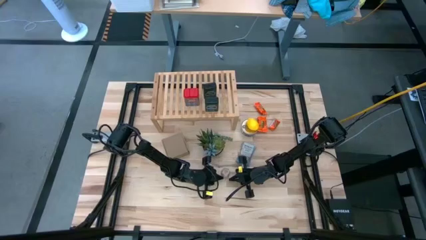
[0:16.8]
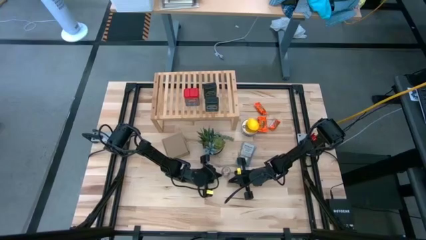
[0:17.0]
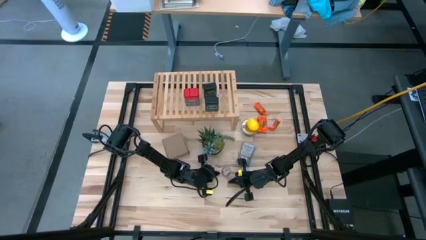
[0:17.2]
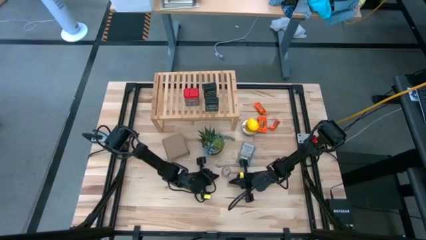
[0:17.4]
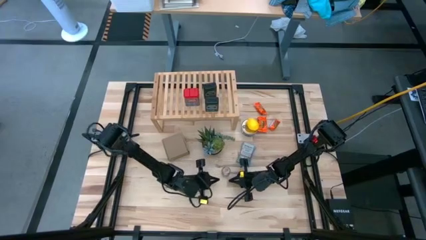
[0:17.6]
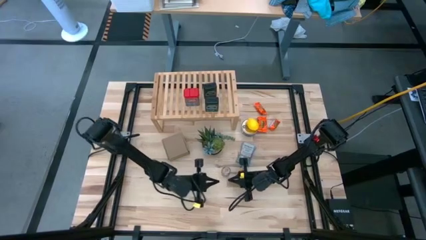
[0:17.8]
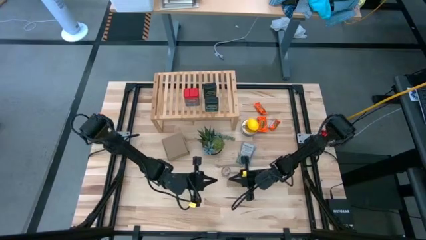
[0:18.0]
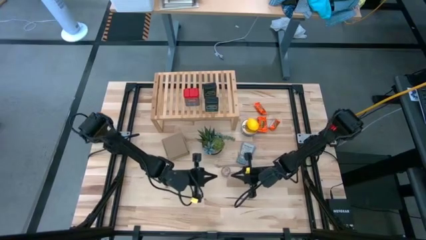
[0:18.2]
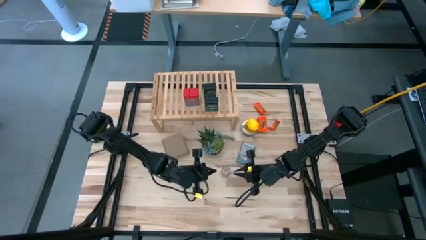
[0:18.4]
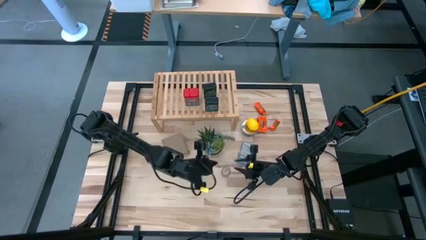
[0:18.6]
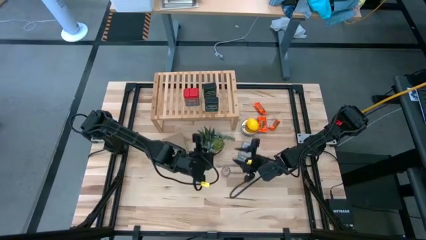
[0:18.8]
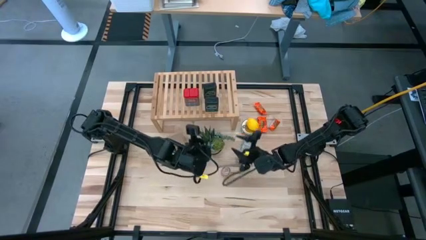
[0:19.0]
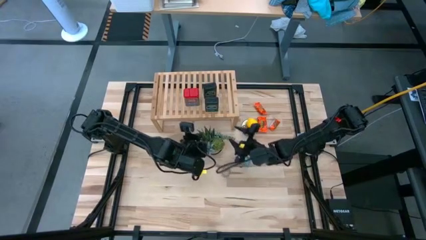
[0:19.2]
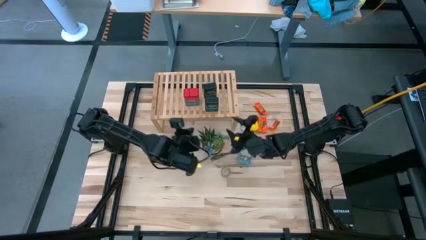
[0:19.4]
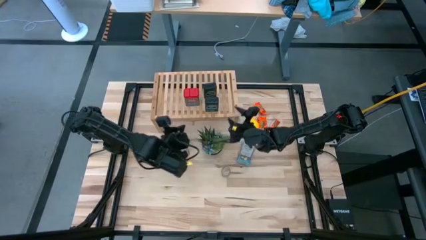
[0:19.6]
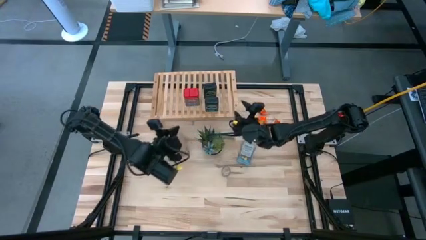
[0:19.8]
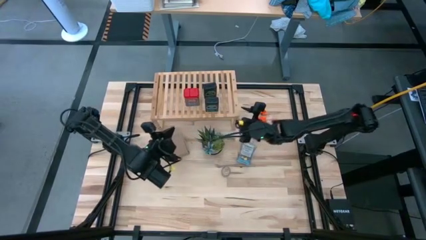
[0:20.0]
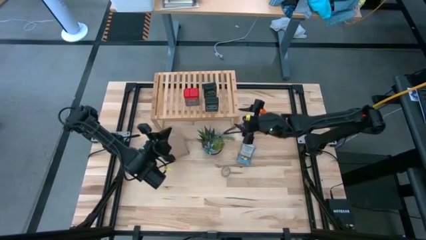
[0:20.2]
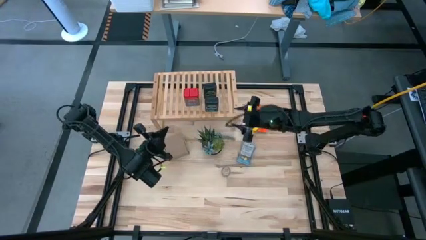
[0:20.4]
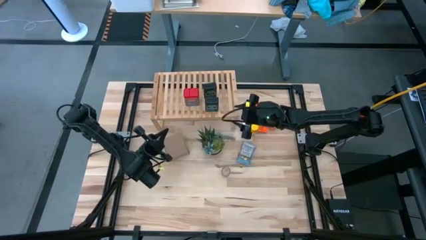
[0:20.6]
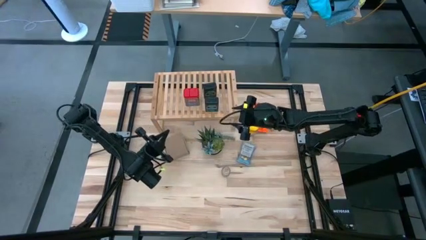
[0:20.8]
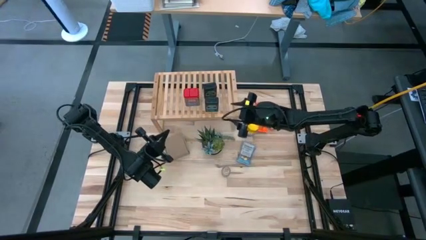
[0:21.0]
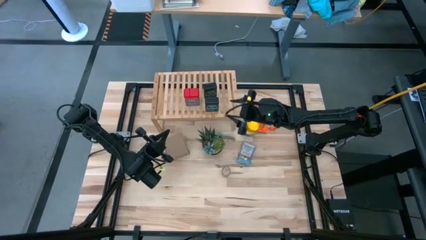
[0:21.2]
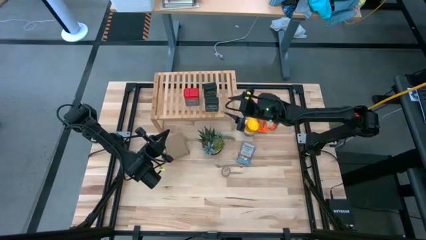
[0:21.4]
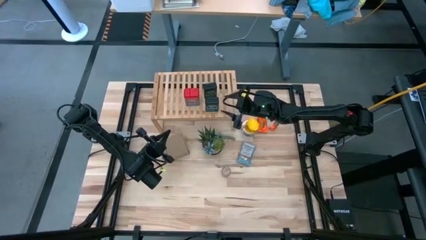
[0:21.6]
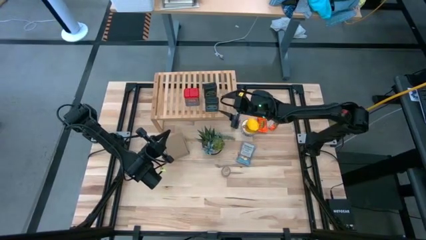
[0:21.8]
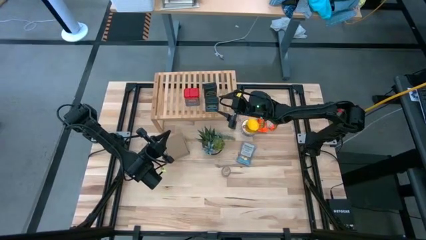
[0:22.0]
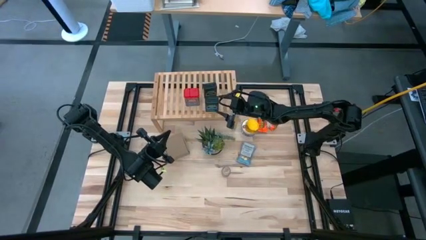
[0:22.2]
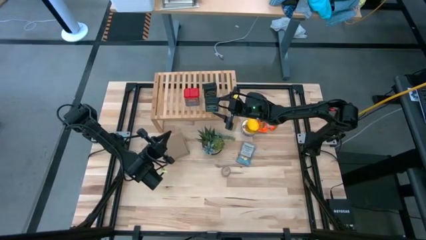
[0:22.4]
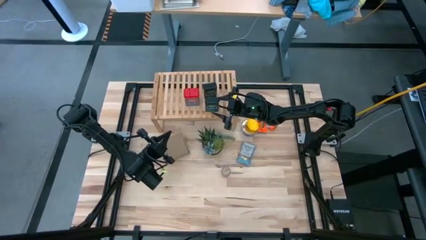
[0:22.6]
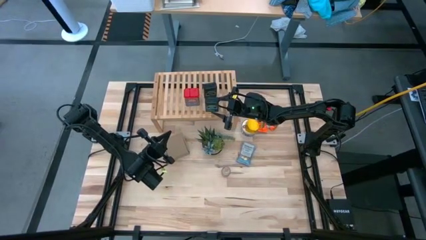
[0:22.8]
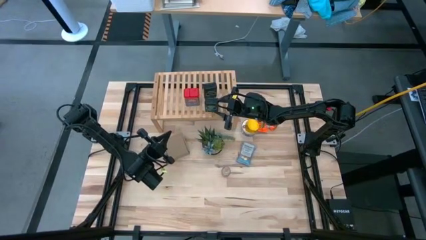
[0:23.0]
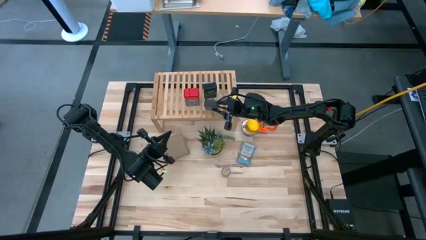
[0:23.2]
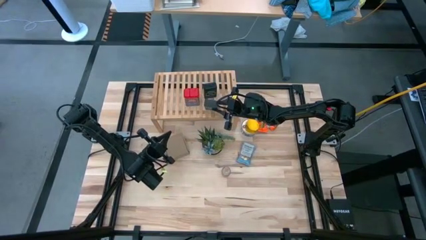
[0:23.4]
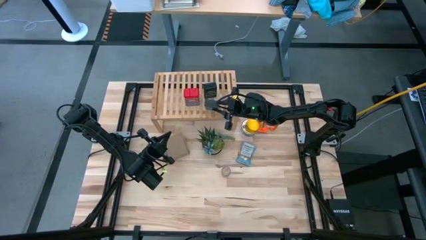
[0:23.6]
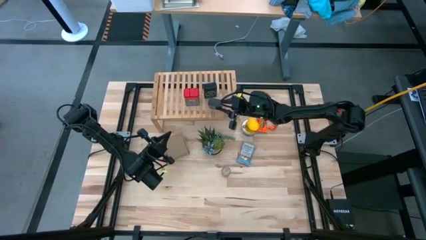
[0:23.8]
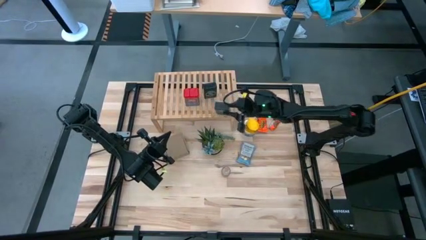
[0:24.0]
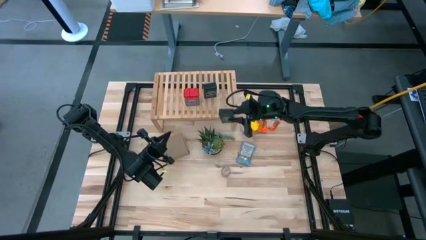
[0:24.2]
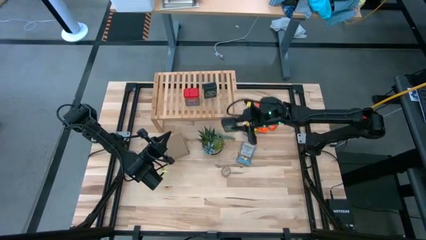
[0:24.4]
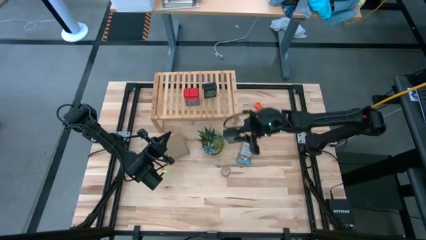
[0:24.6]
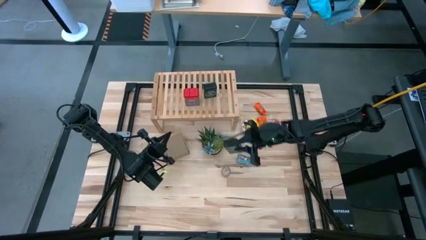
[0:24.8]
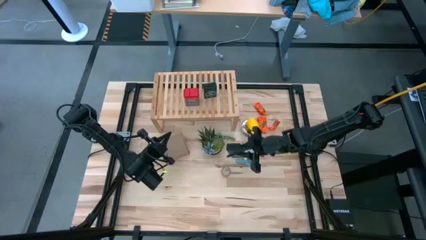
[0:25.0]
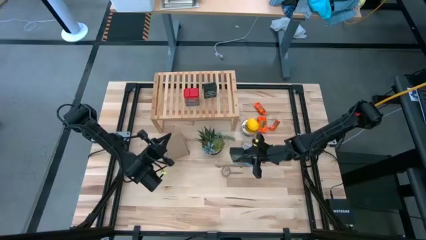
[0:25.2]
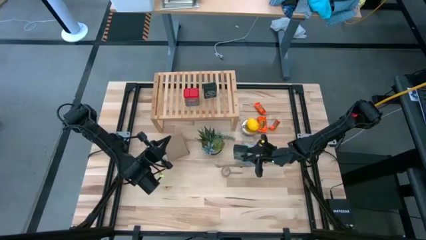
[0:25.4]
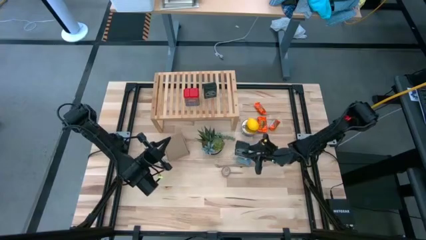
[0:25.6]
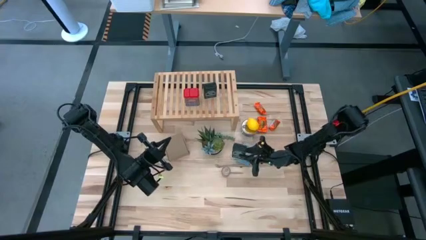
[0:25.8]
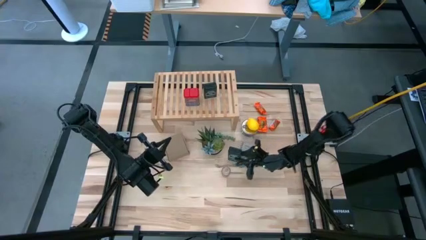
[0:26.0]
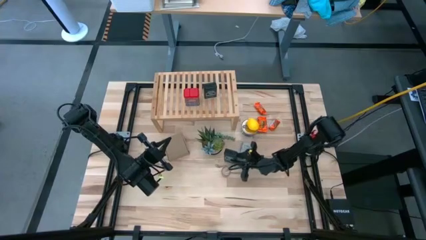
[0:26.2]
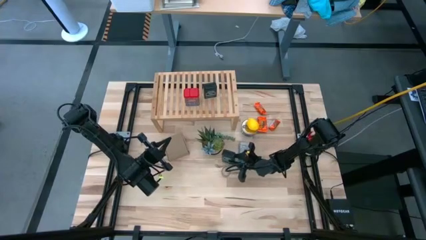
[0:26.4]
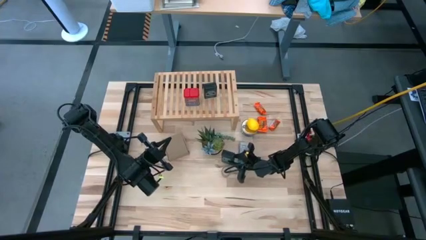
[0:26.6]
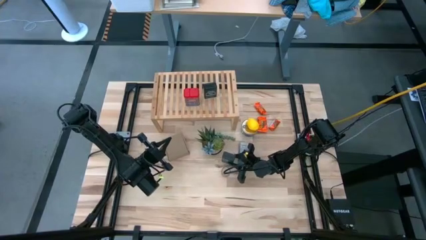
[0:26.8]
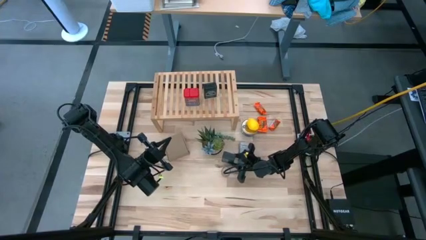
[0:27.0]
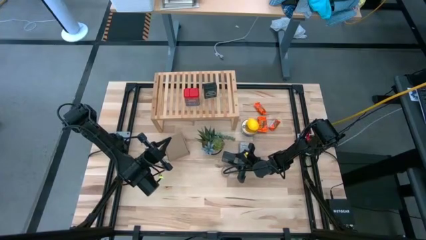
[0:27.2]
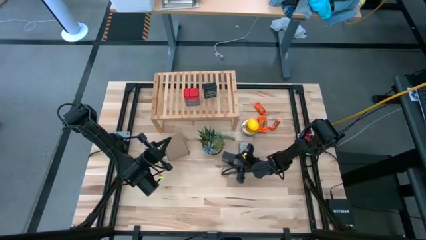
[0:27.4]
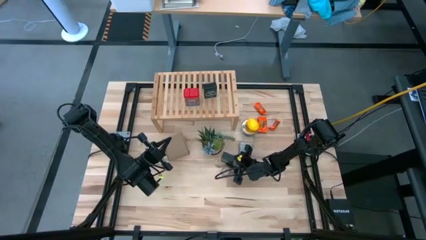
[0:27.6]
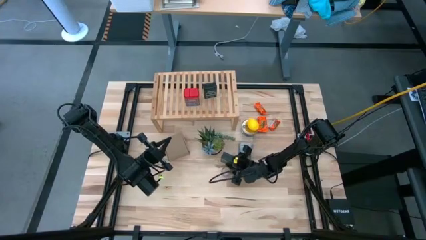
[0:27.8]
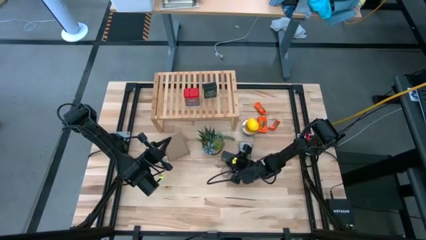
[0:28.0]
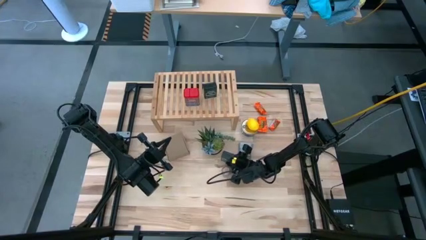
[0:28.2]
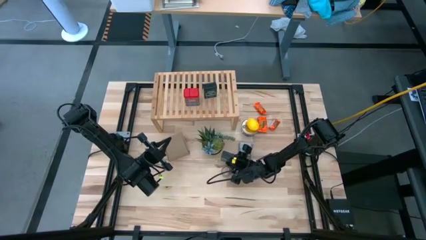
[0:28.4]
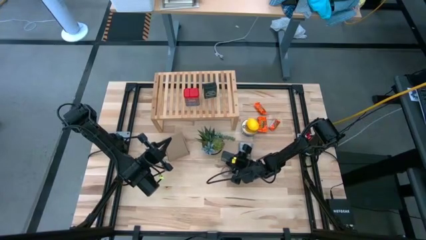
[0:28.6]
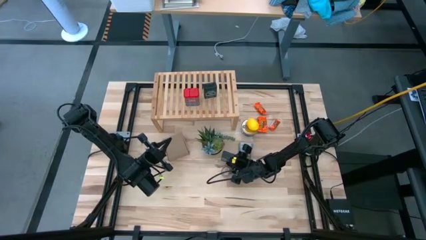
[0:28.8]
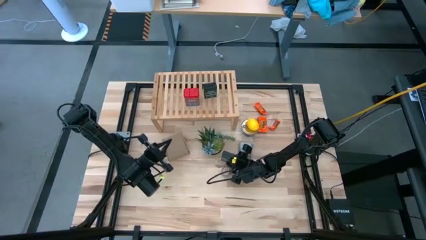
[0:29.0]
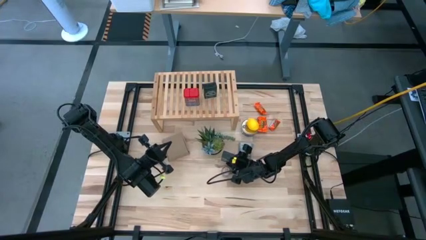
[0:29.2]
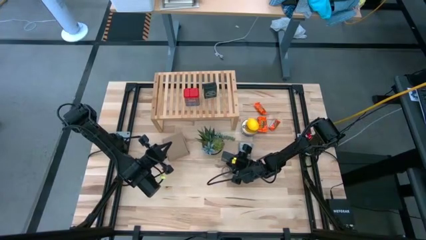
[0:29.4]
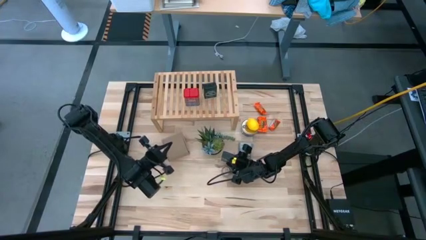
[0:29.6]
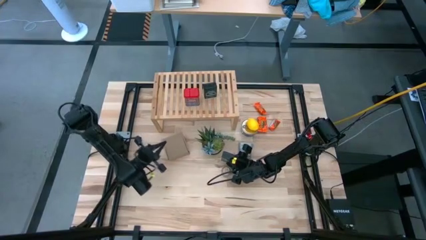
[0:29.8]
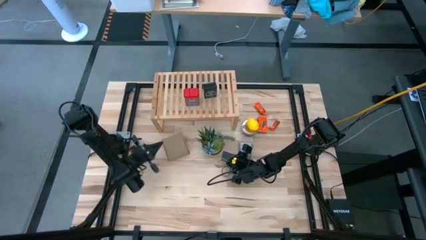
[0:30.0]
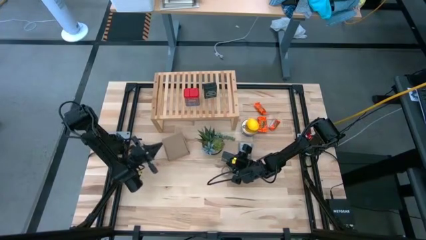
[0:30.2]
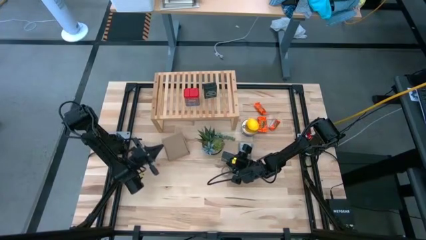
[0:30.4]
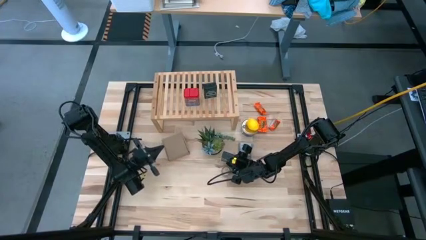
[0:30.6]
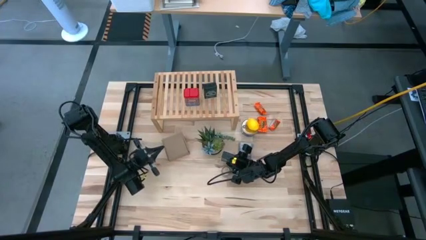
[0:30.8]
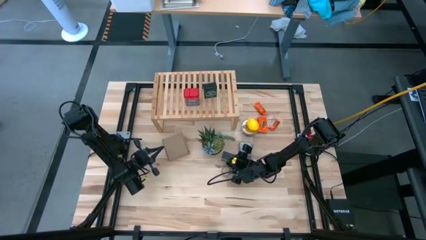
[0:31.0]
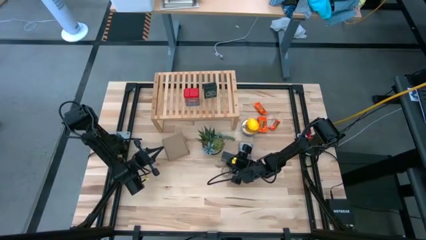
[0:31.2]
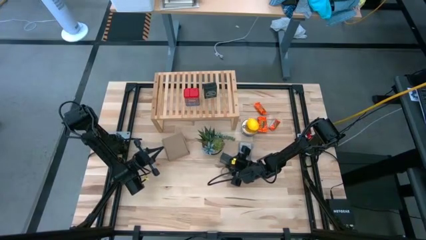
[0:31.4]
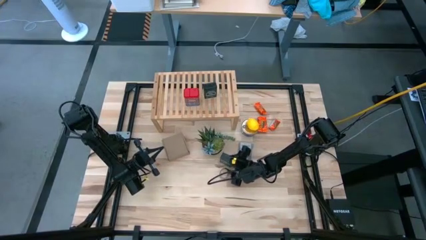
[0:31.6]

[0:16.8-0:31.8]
Task: Shelf spices
Remove the bottom green seasoning can from the shelf
